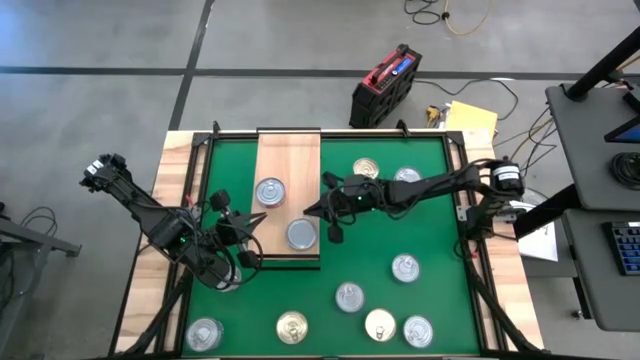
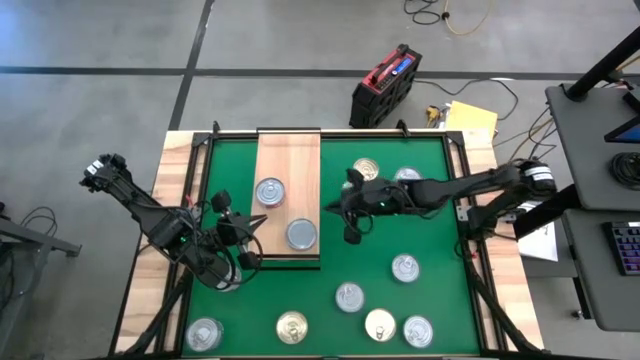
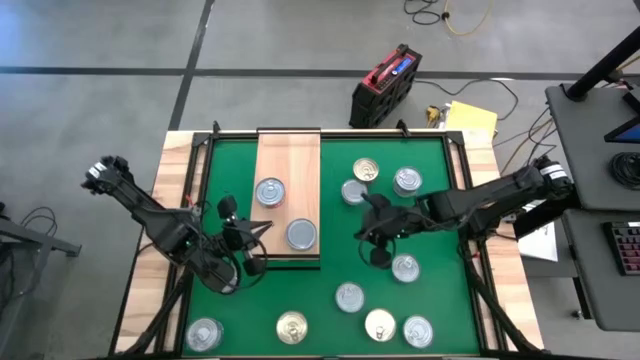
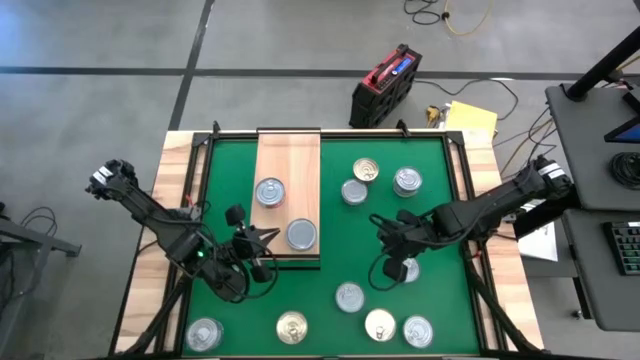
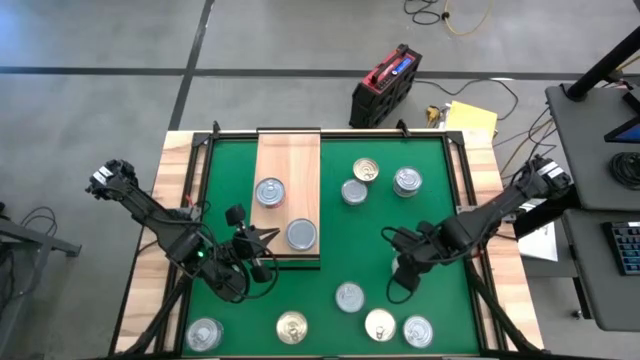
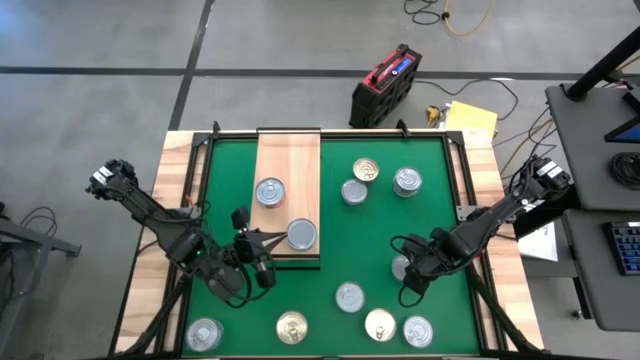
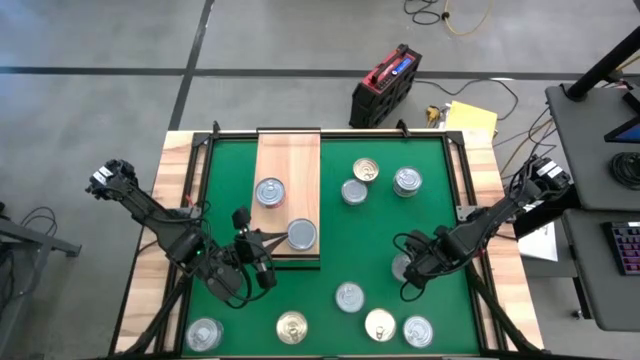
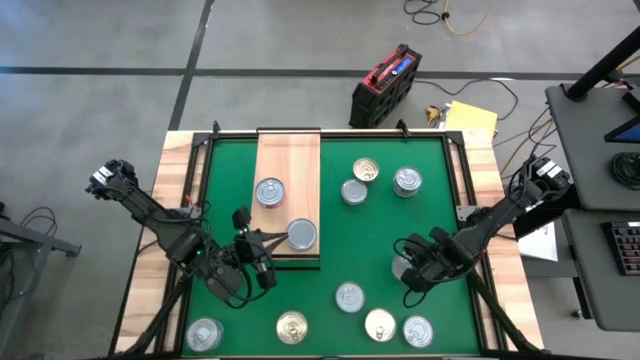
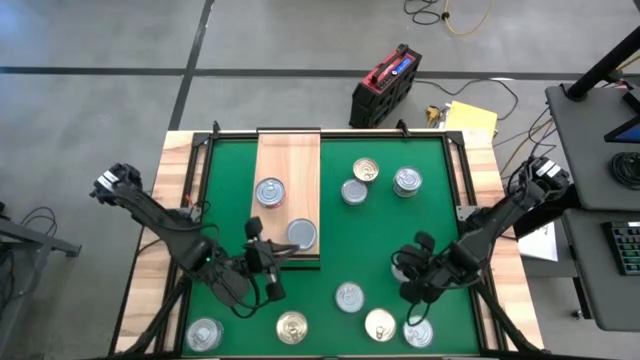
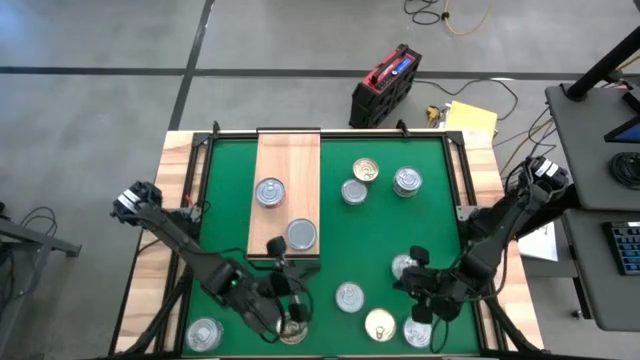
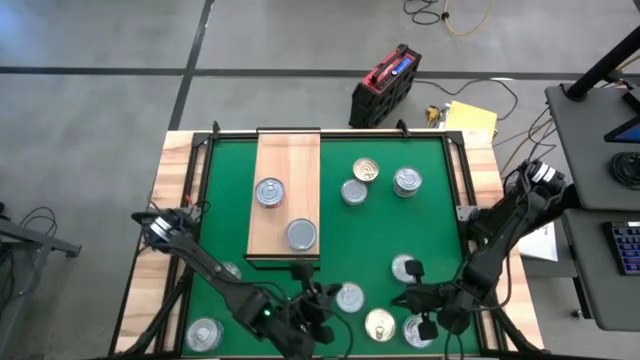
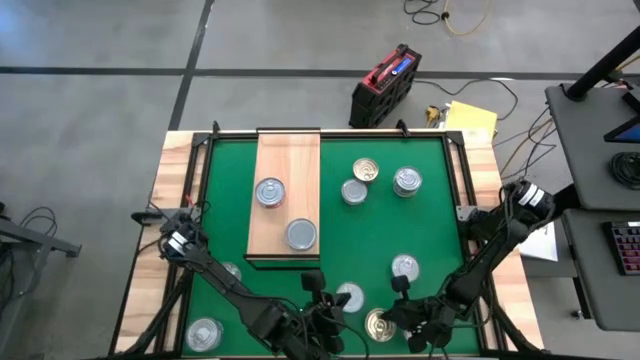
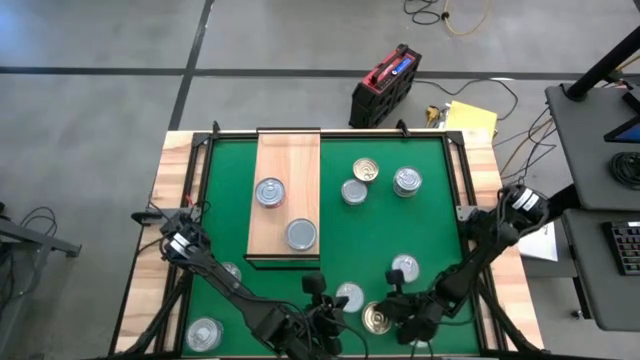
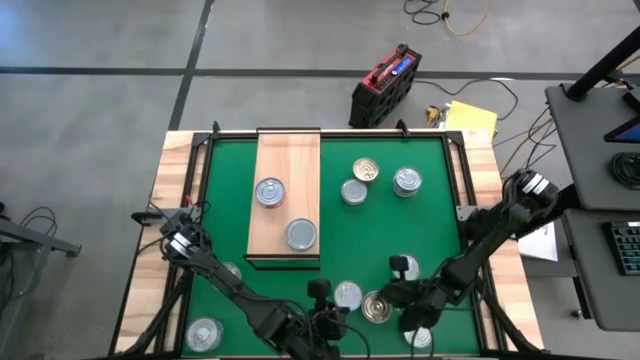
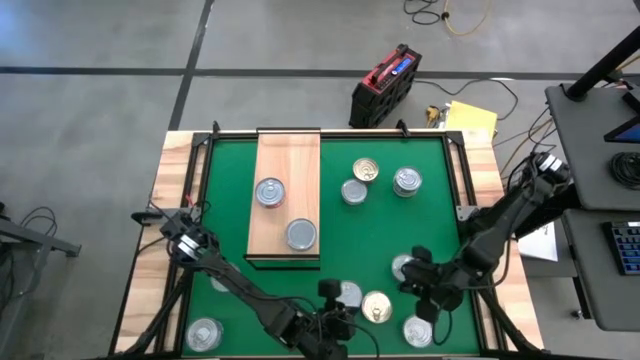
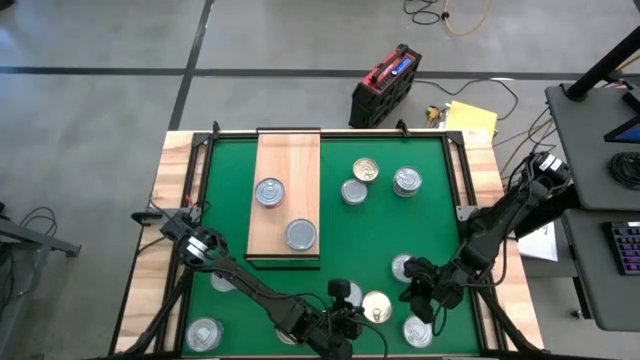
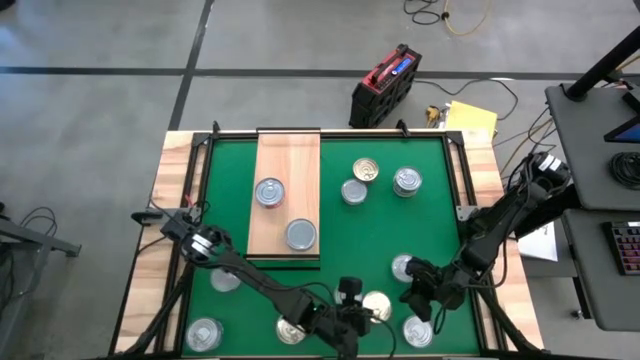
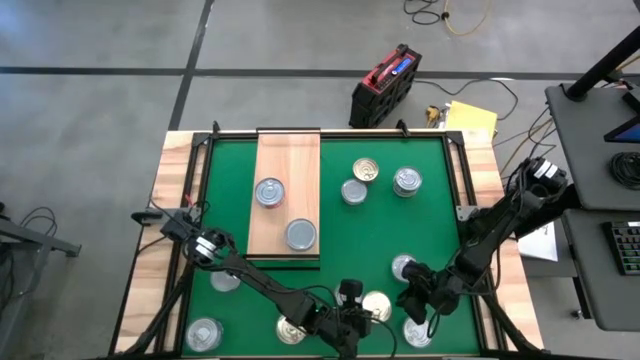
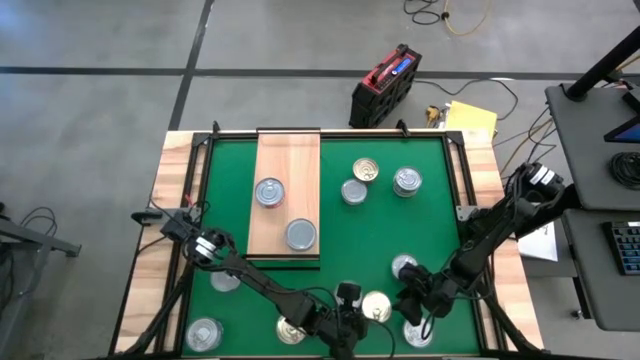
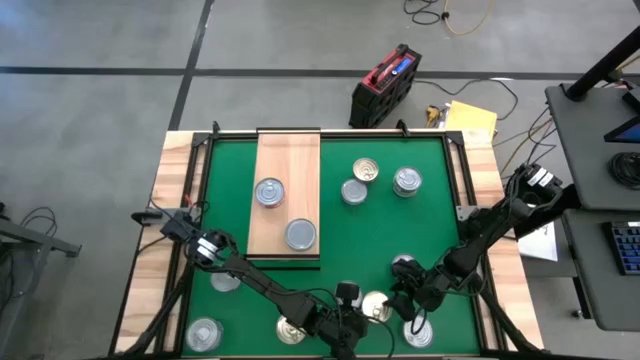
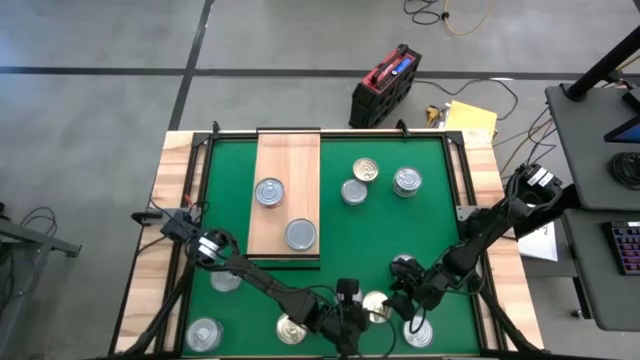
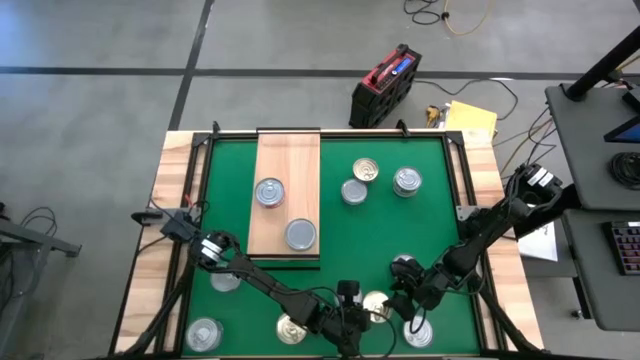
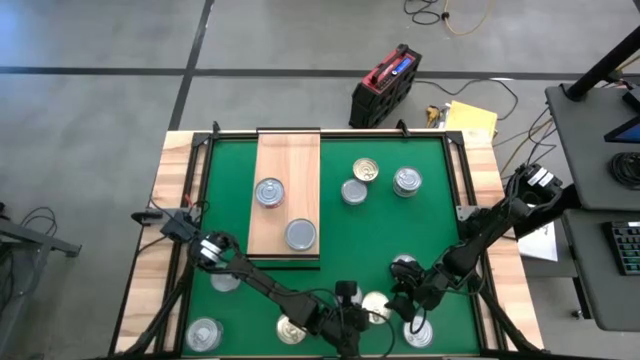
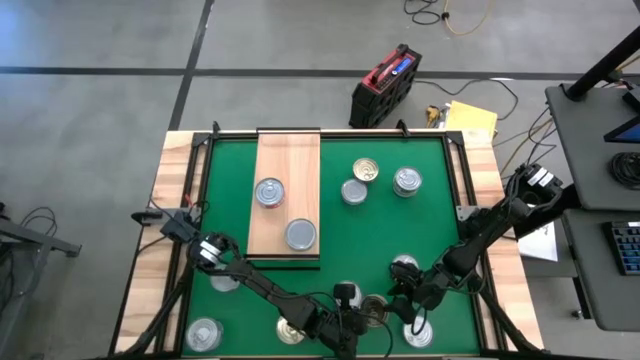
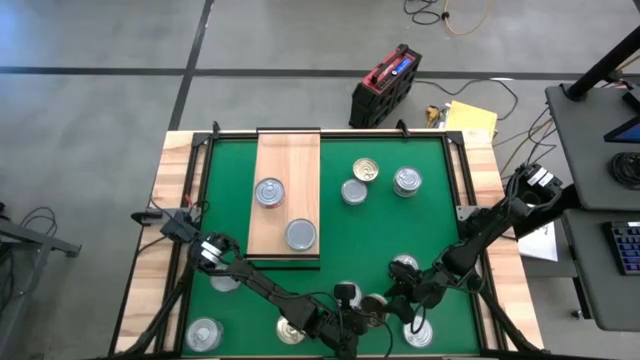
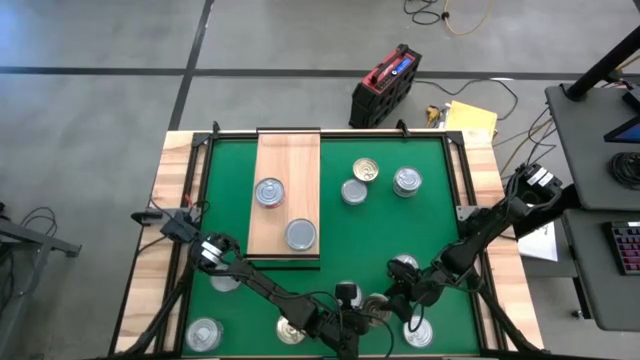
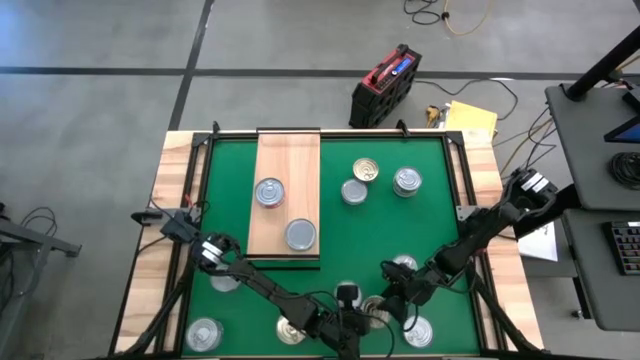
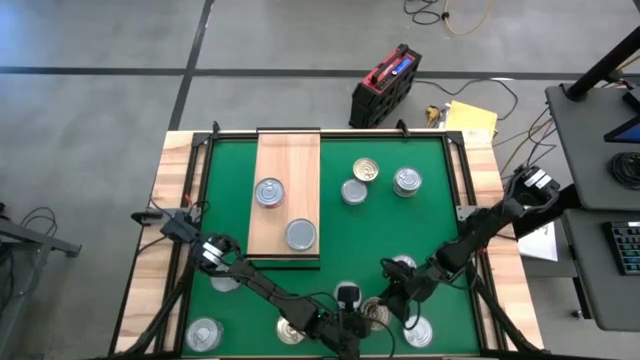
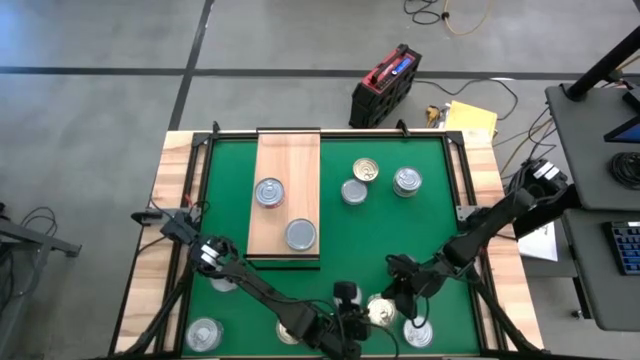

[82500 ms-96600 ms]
Task: Stack canned seafood by type on shelf
Put the blue and pink tuna can on the shelf

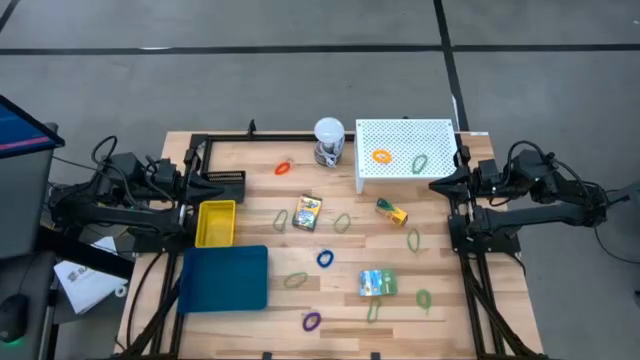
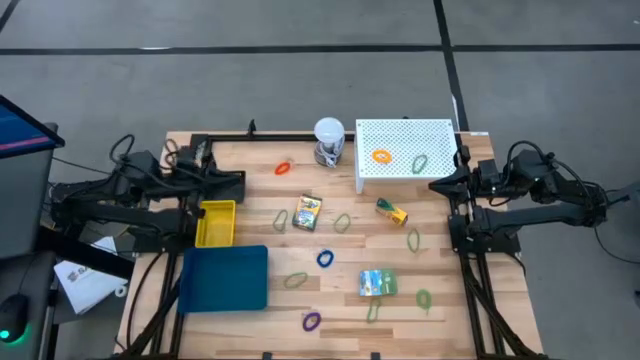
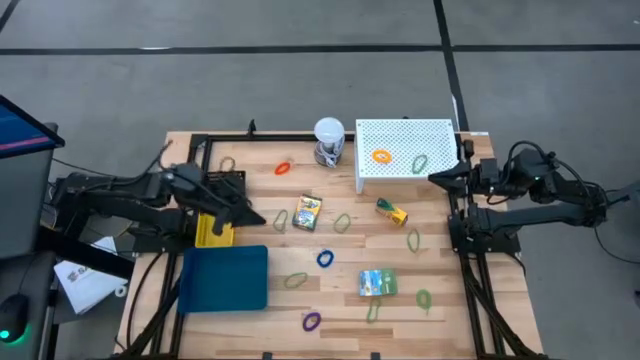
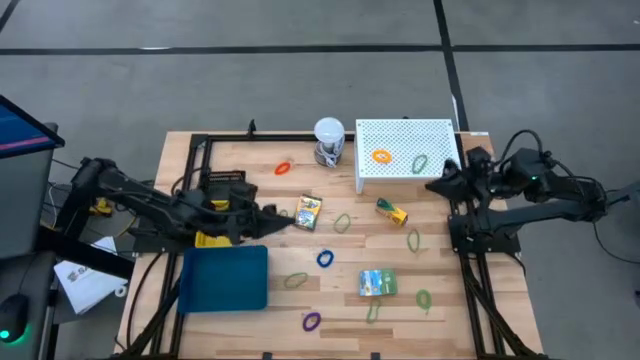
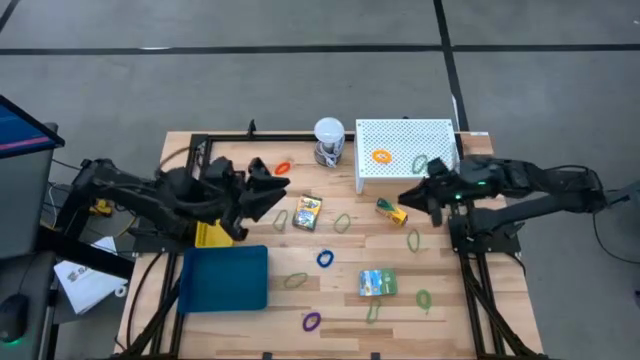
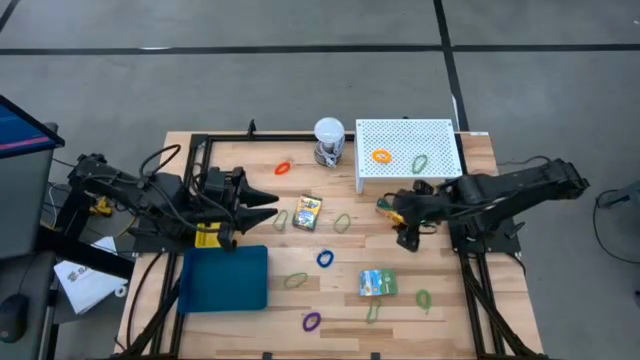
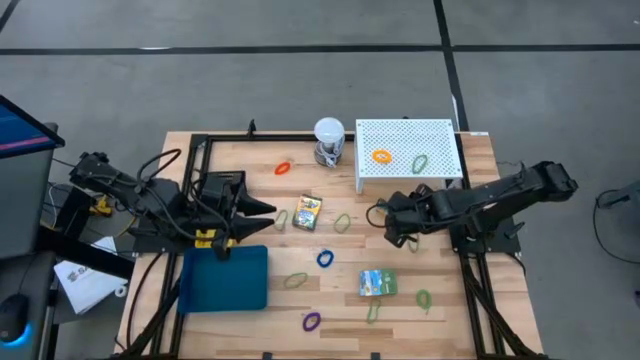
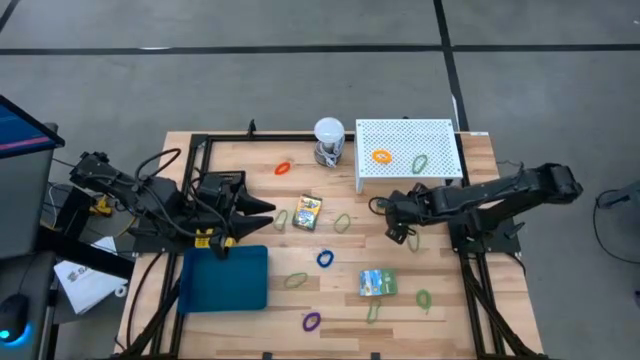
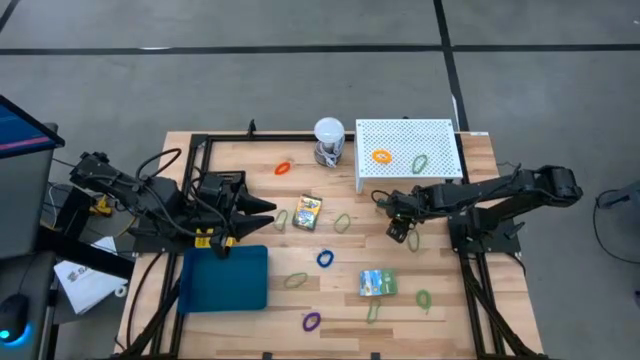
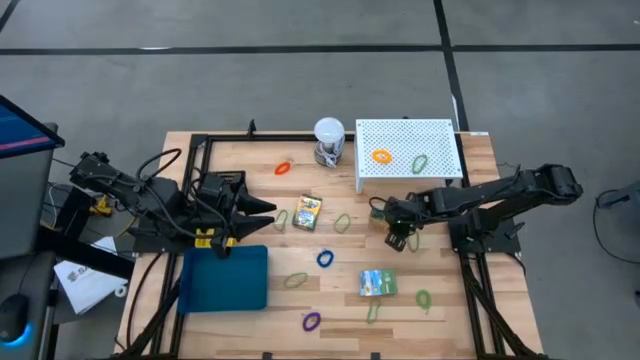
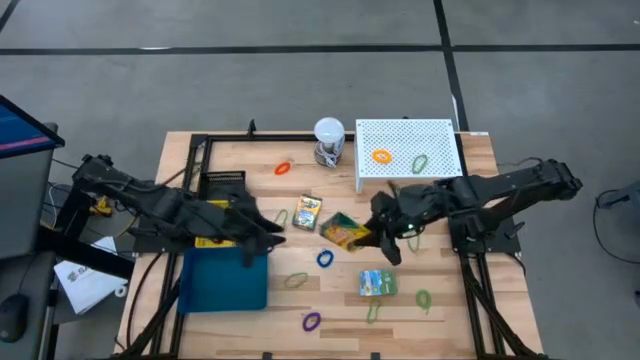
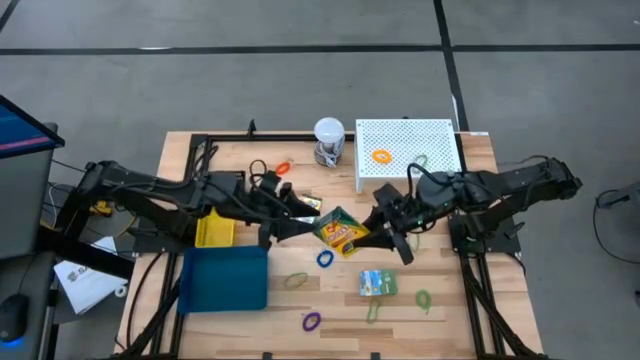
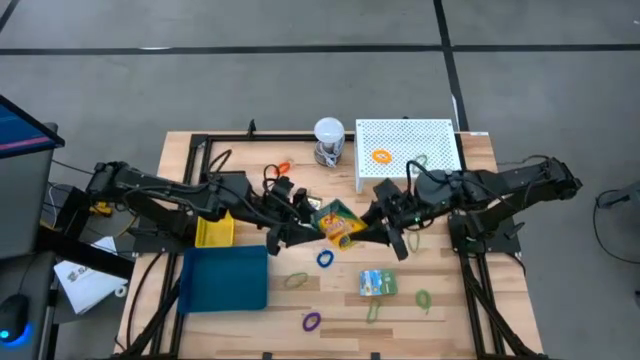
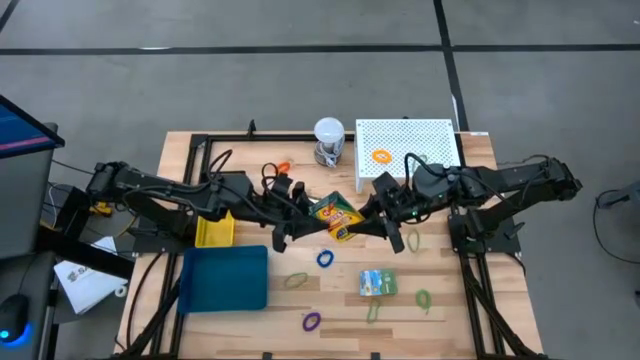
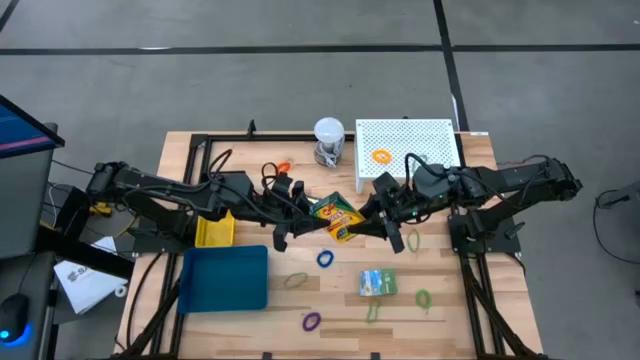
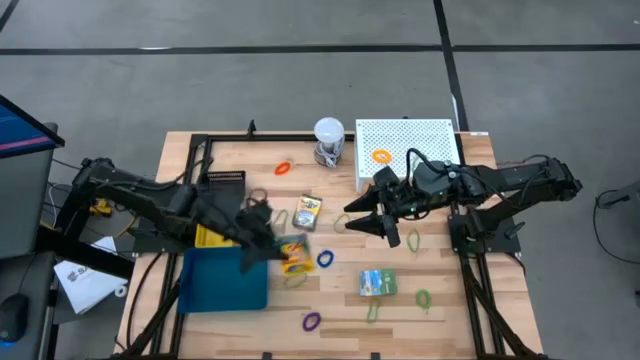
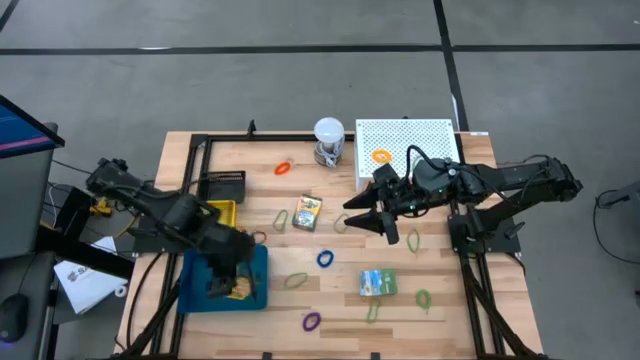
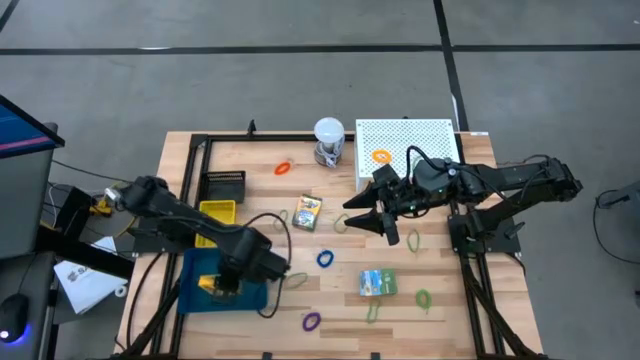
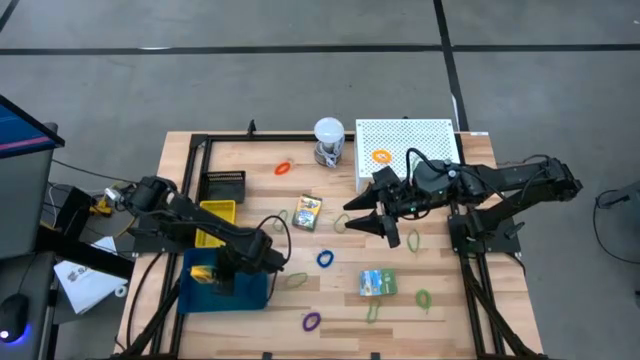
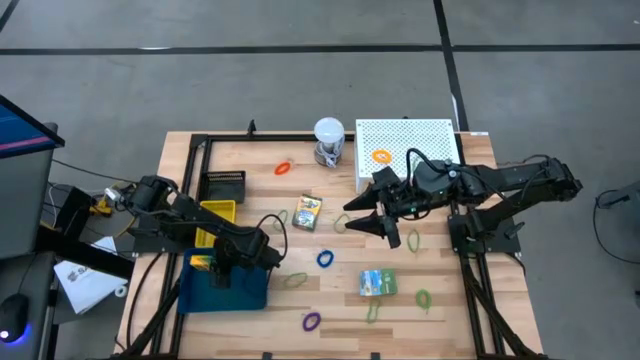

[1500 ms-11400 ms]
Task: Pick & Place Office Desk Supplies
Put the top right crayon box into the blue bin
